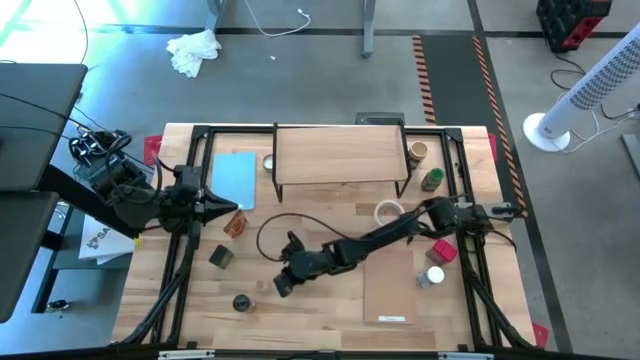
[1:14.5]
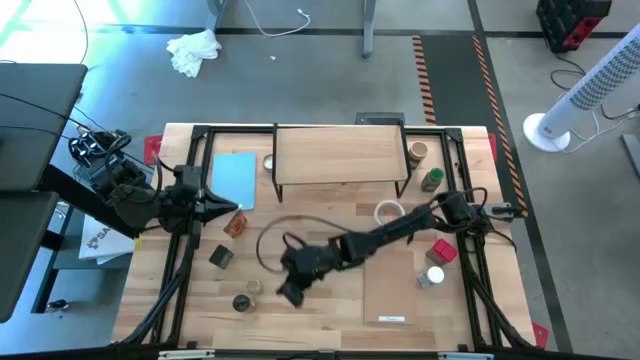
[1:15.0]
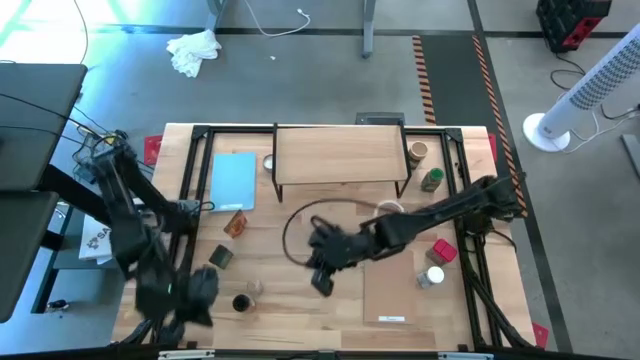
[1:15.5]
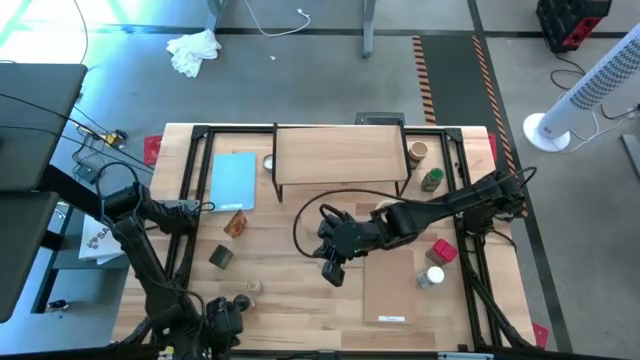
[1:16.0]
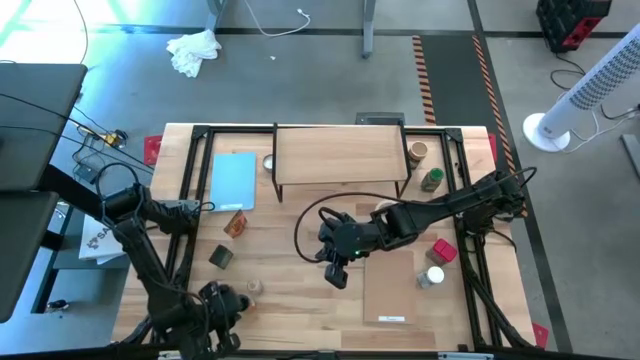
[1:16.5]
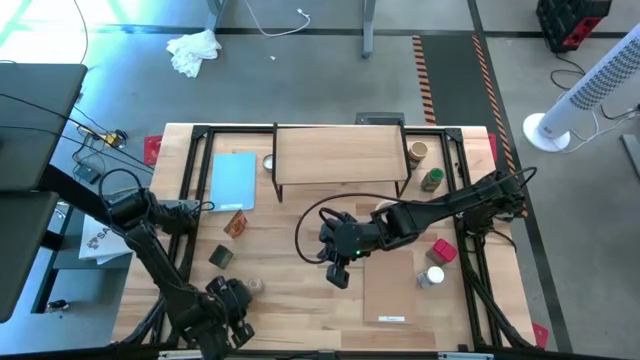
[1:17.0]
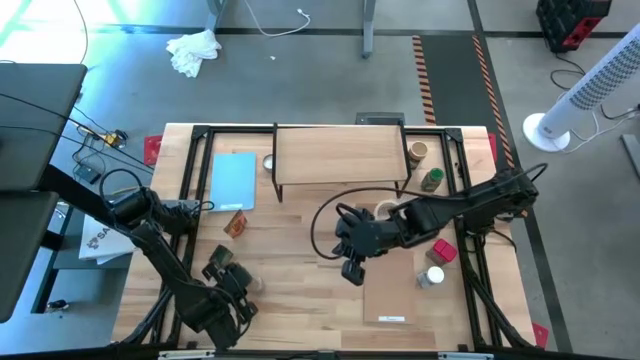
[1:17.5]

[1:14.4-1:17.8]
Task: Shelf spices
Move the black seasoning bottle to the middle left of the table

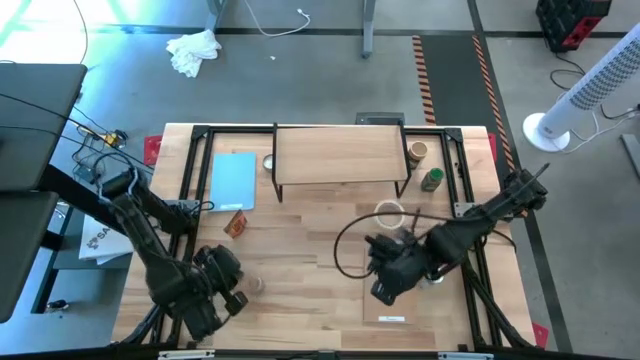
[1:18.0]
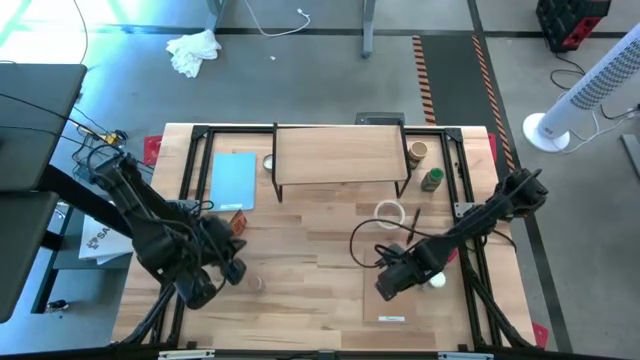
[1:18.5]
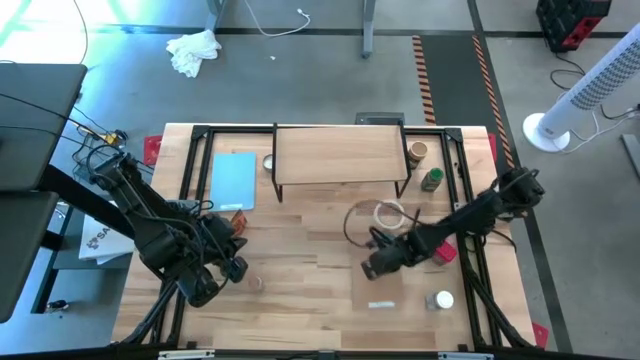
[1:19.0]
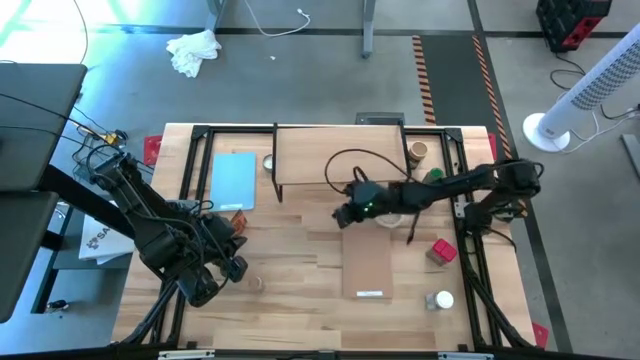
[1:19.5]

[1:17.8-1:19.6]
Move the brown cardboard to the center of the table

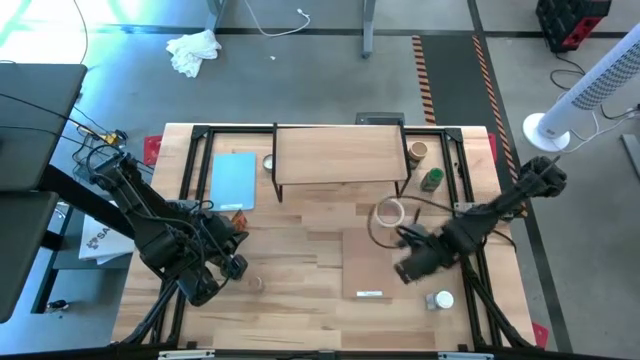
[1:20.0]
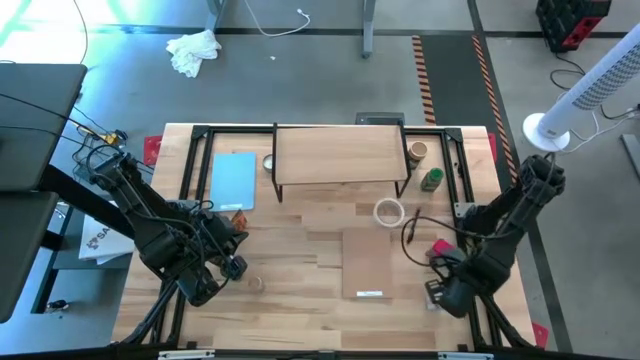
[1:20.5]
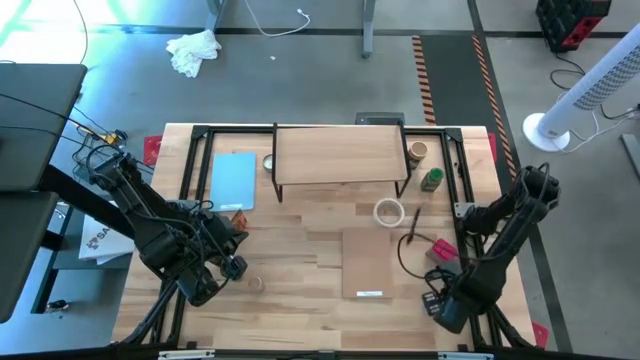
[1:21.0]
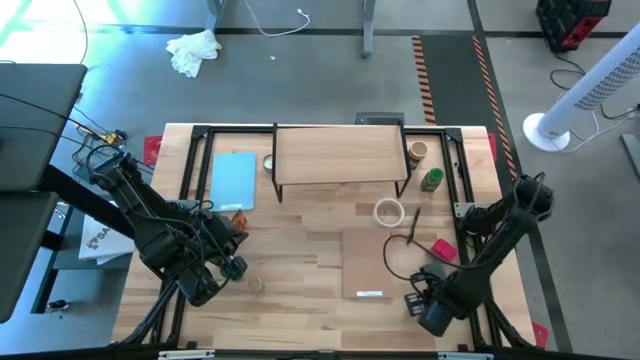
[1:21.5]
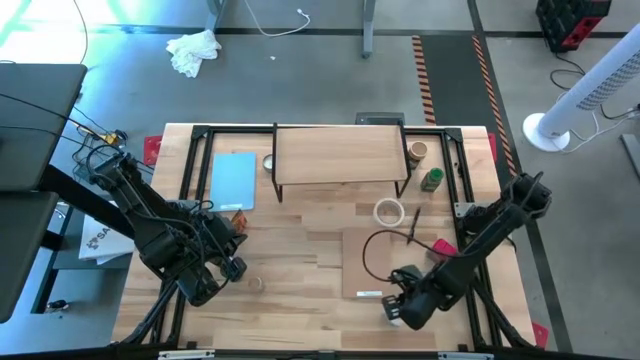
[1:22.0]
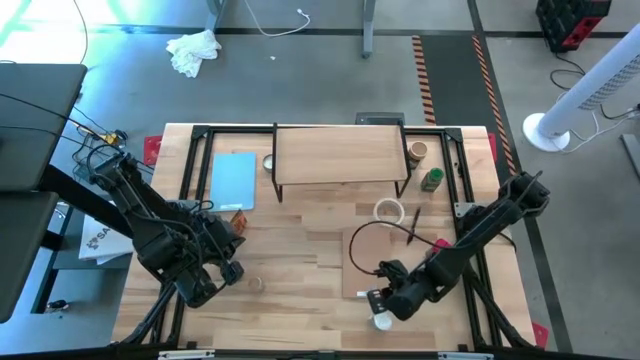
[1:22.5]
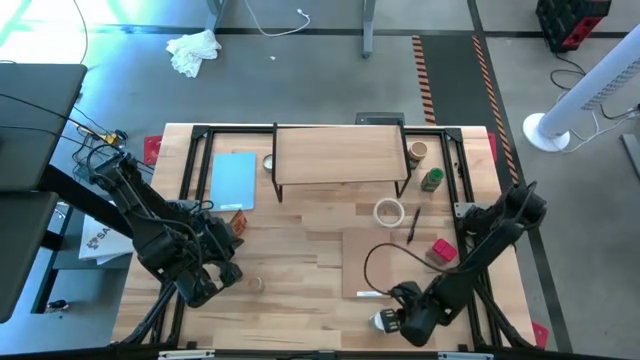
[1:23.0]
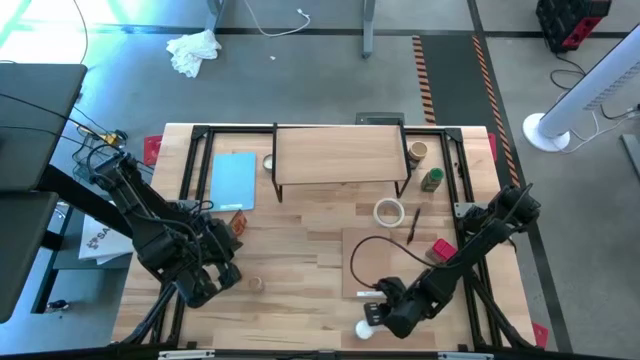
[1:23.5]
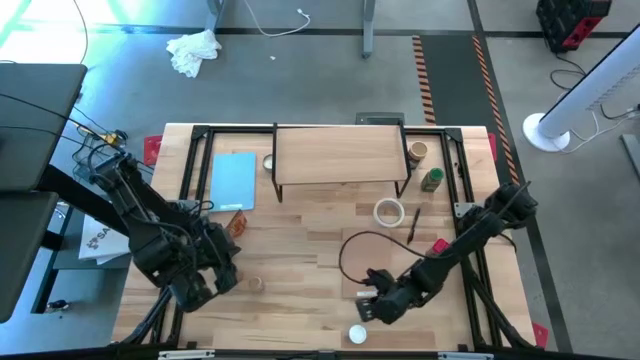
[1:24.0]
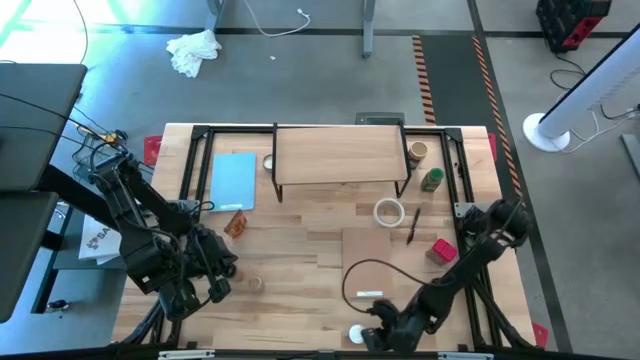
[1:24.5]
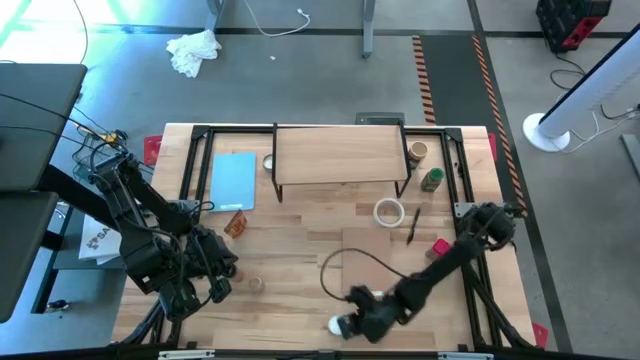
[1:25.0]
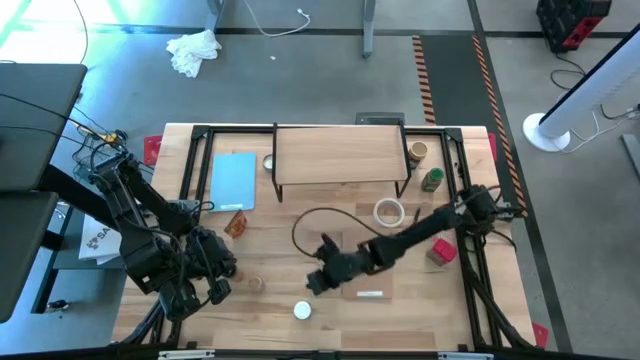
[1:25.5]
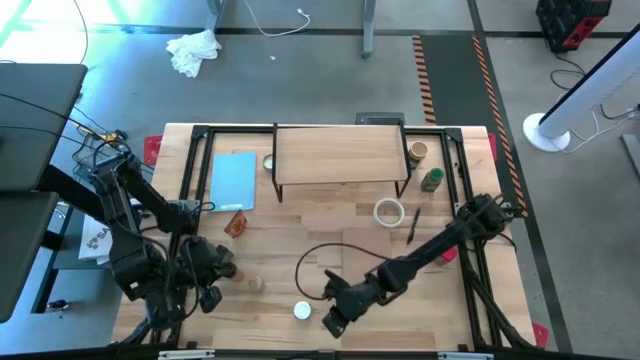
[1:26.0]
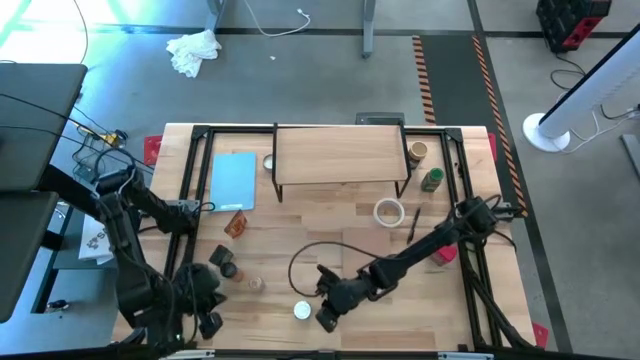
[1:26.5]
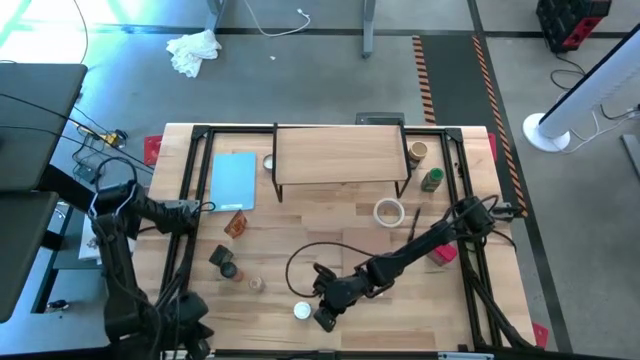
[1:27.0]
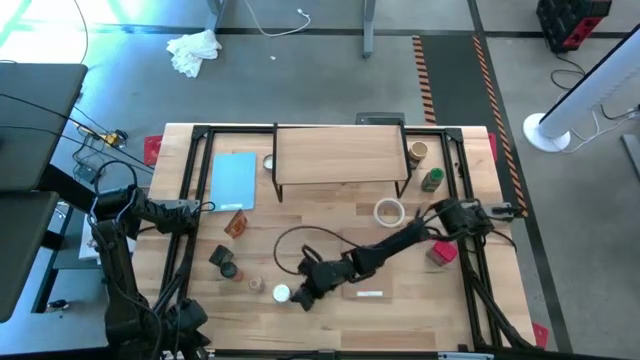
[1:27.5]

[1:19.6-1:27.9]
Move the white seasoning bottle to the middle left of the table

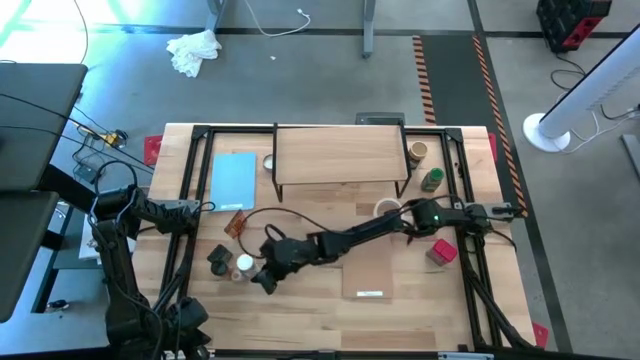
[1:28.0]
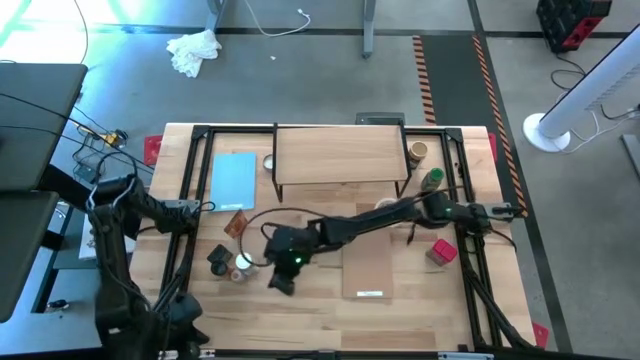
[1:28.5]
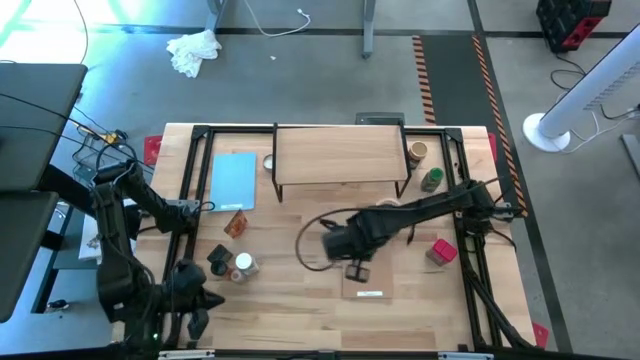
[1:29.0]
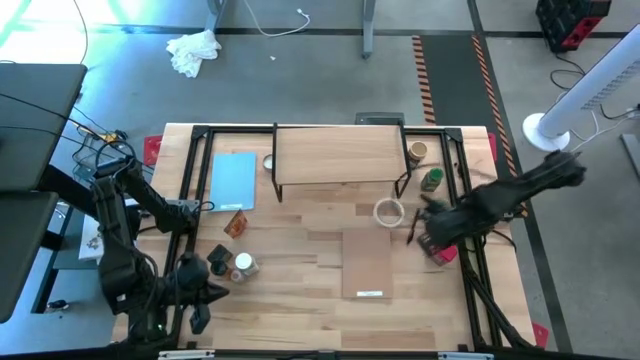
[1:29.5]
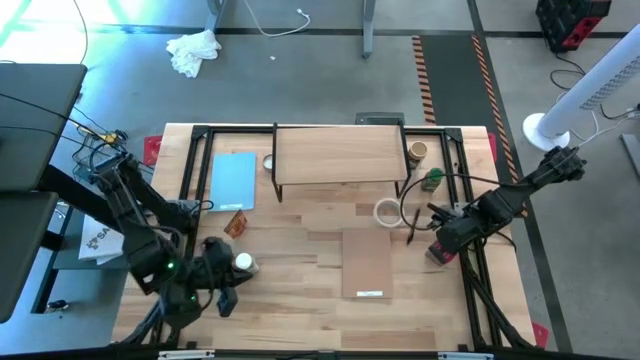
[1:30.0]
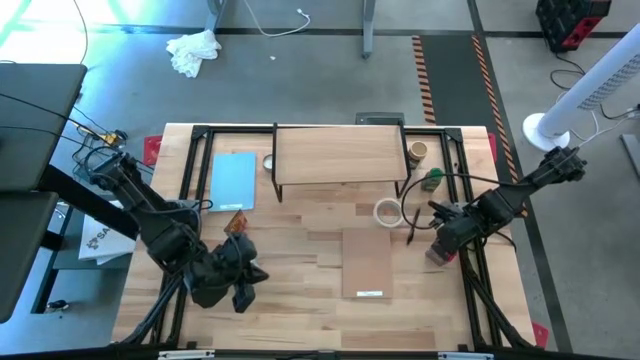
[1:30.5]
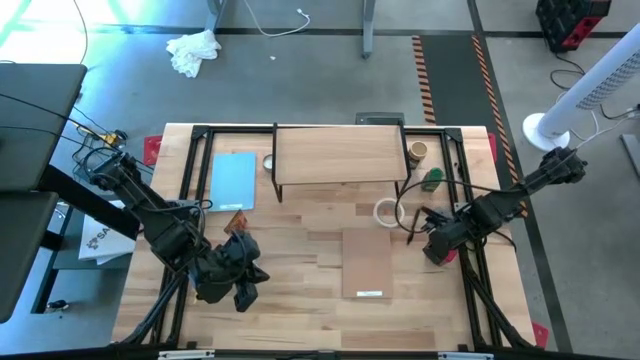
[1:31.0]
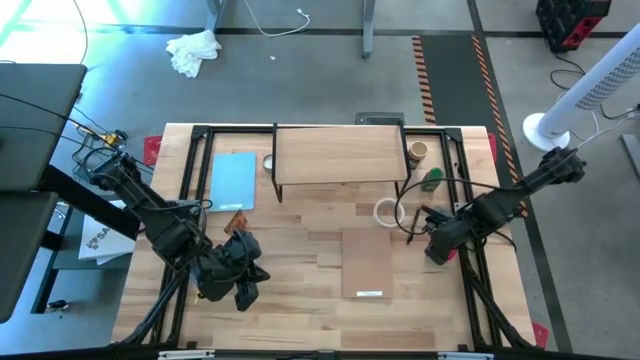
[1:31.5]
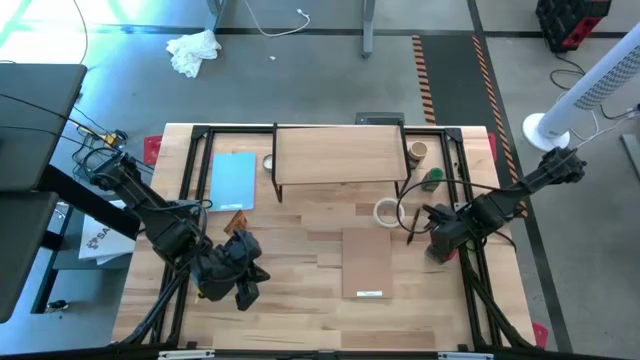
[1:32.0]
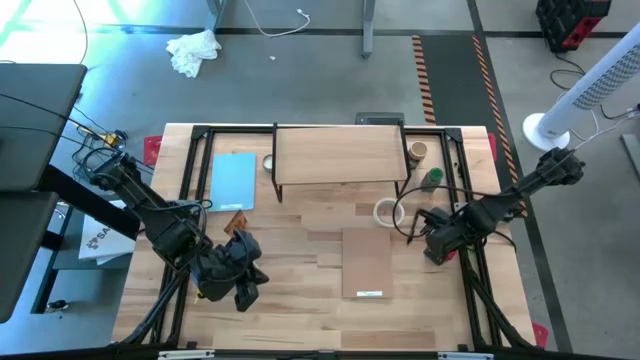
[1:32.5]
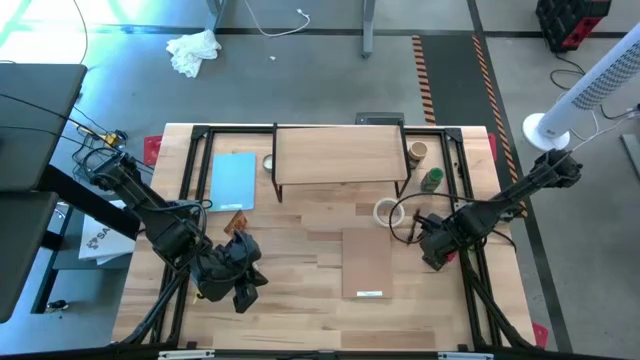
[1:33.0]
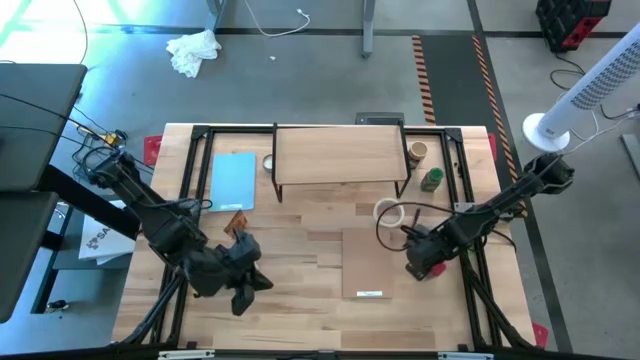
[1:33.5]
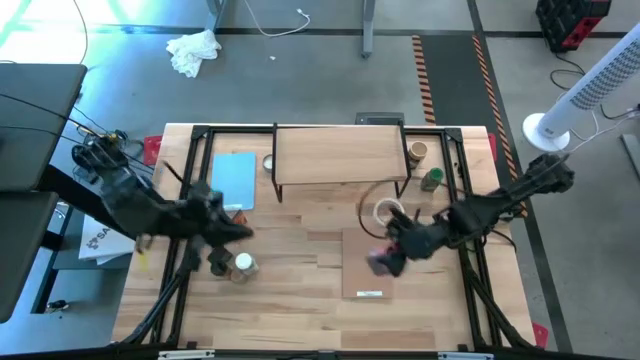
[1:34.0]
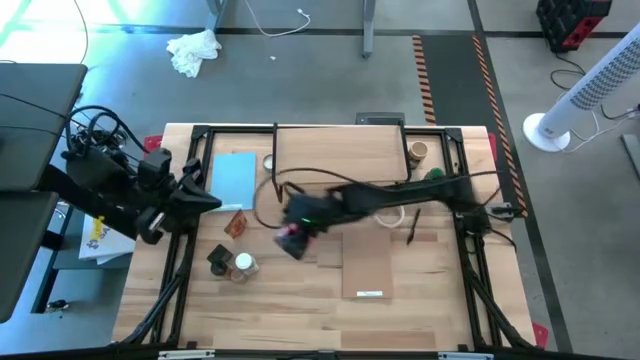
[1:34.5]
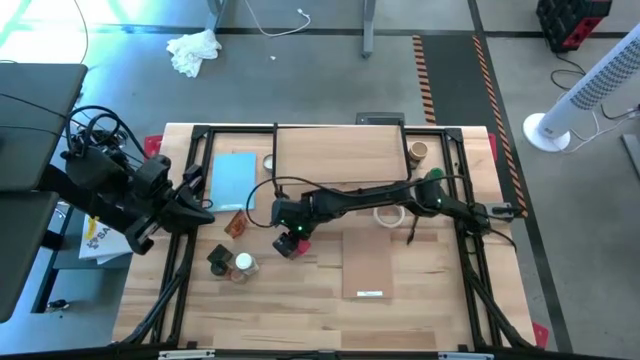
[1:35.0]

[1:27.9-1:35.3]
Move the red seasoning can to the middle left of the table
